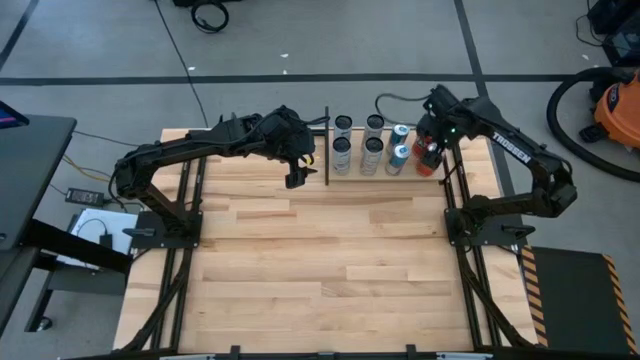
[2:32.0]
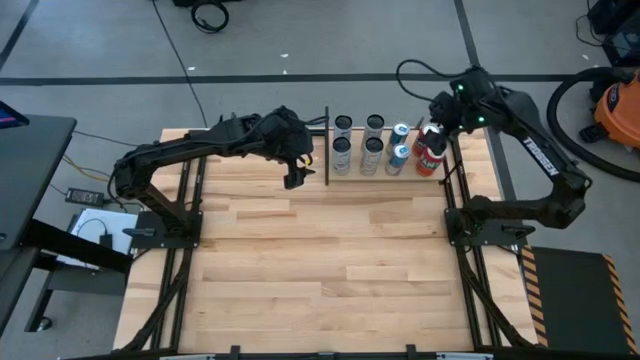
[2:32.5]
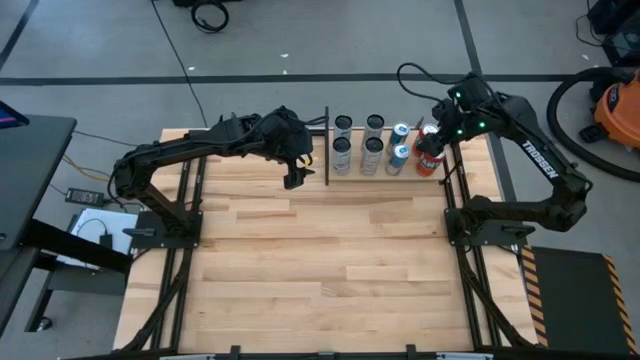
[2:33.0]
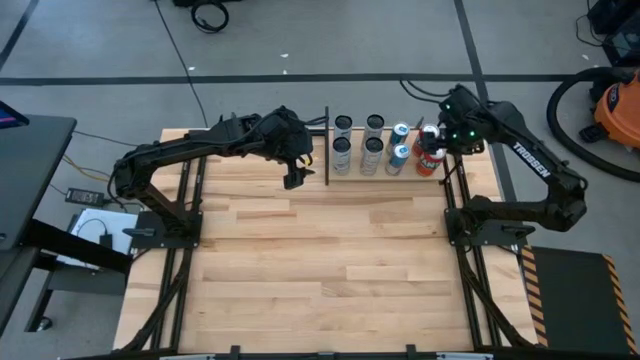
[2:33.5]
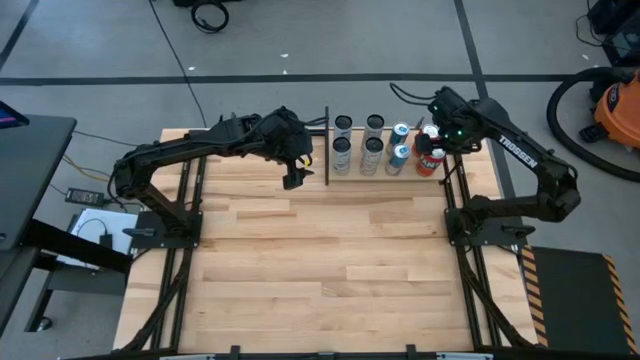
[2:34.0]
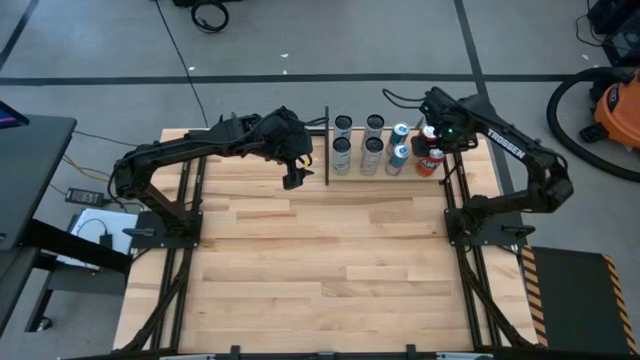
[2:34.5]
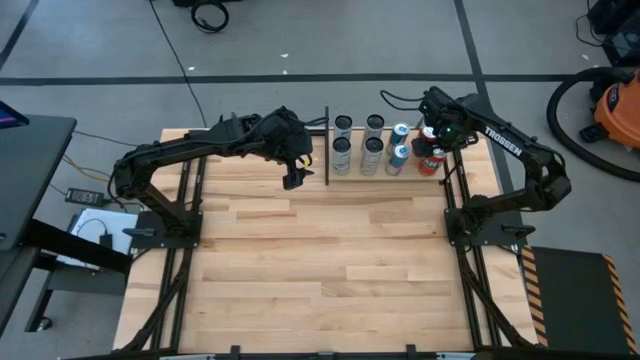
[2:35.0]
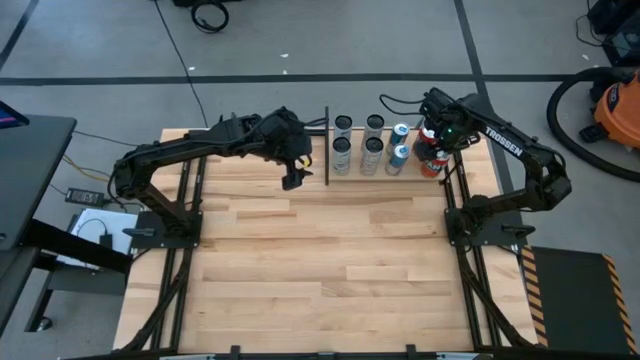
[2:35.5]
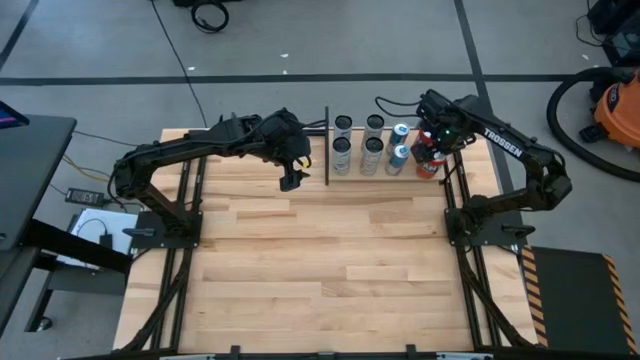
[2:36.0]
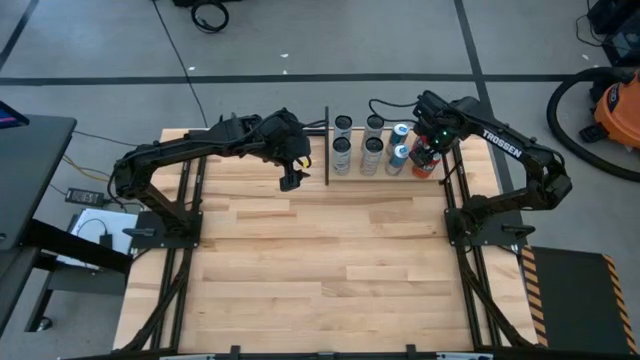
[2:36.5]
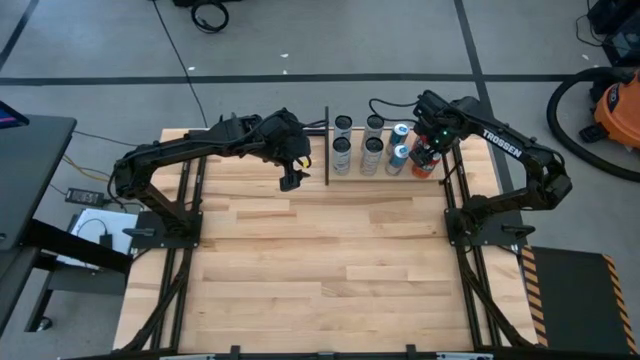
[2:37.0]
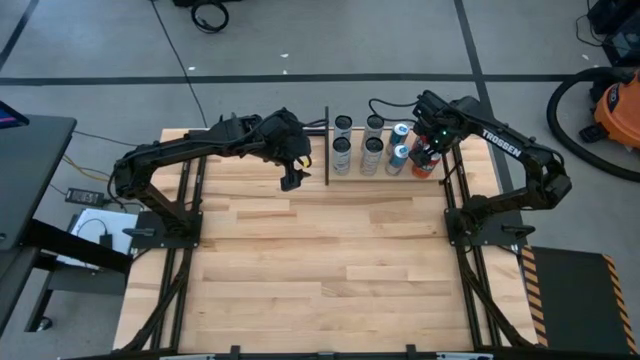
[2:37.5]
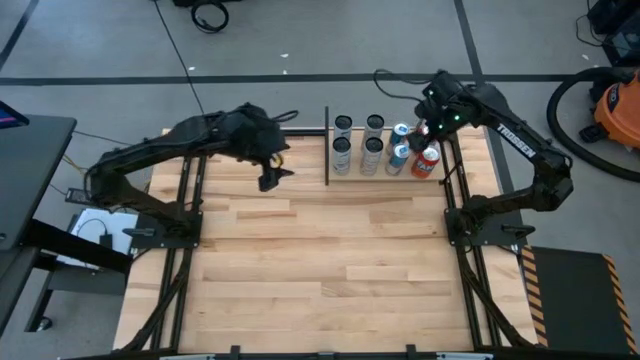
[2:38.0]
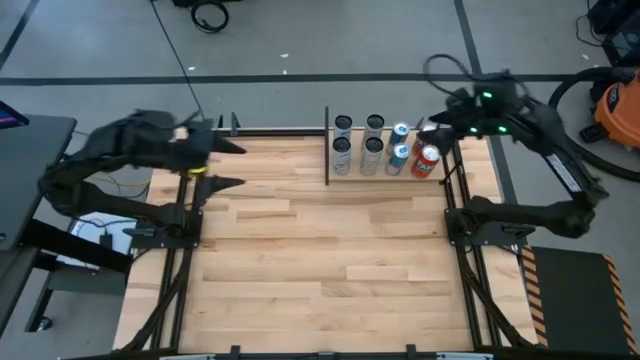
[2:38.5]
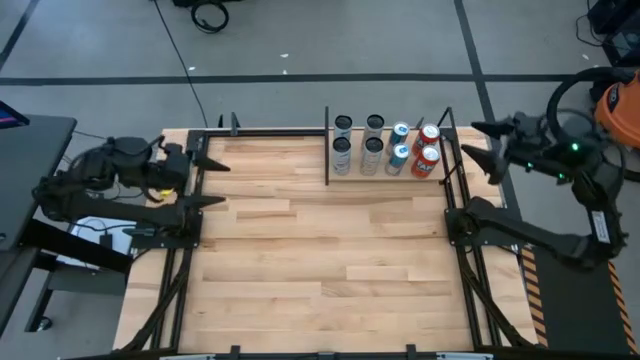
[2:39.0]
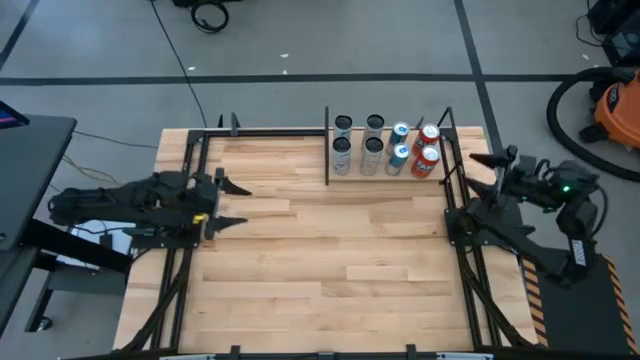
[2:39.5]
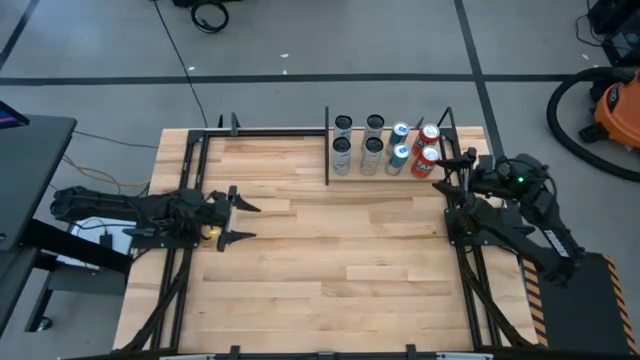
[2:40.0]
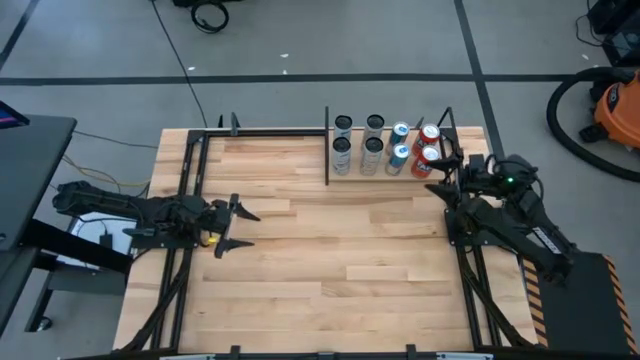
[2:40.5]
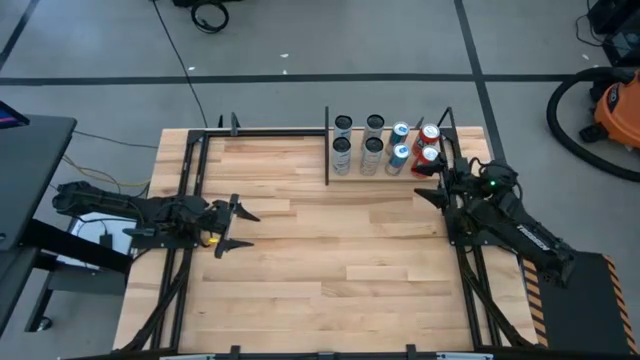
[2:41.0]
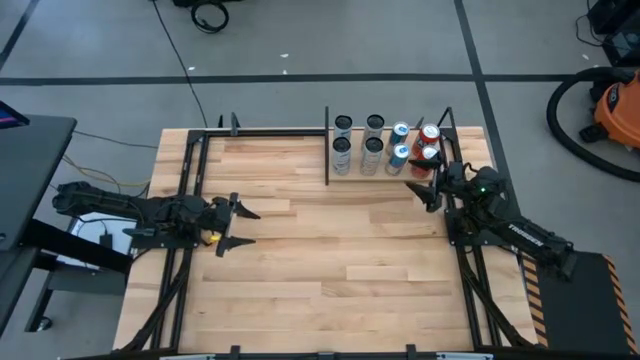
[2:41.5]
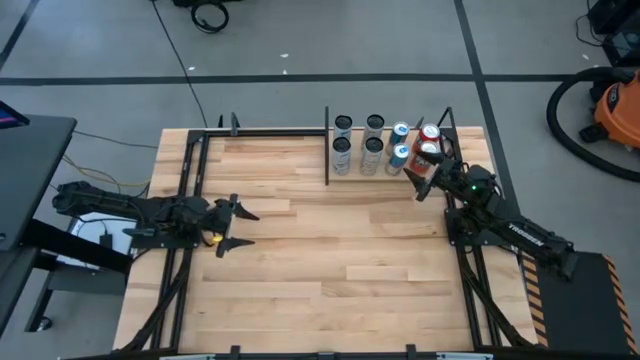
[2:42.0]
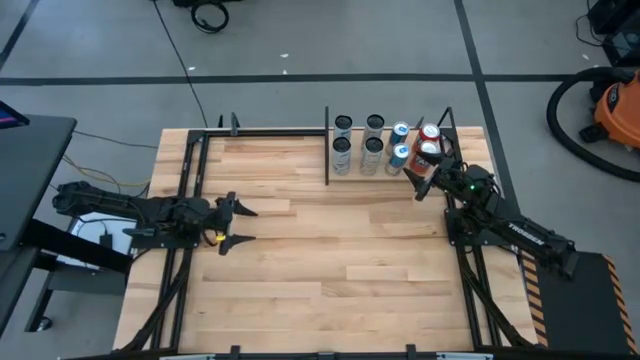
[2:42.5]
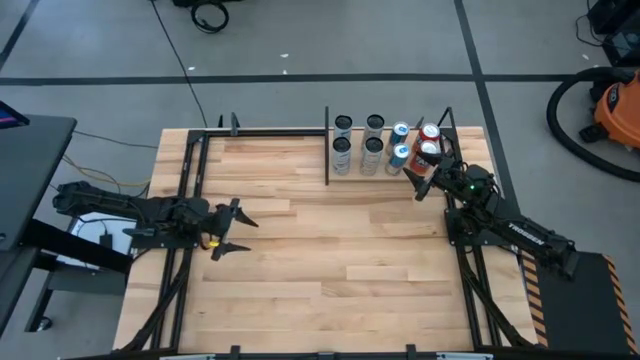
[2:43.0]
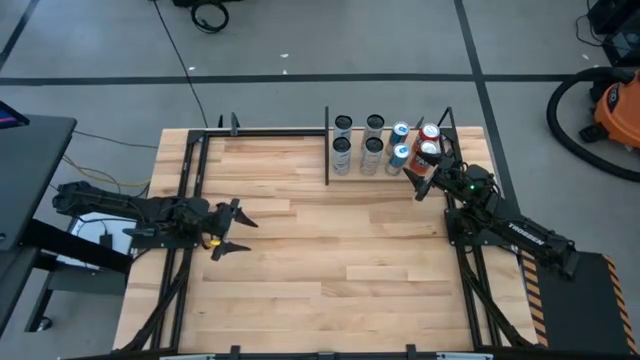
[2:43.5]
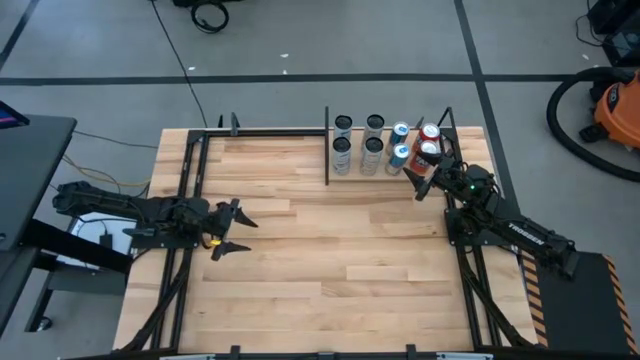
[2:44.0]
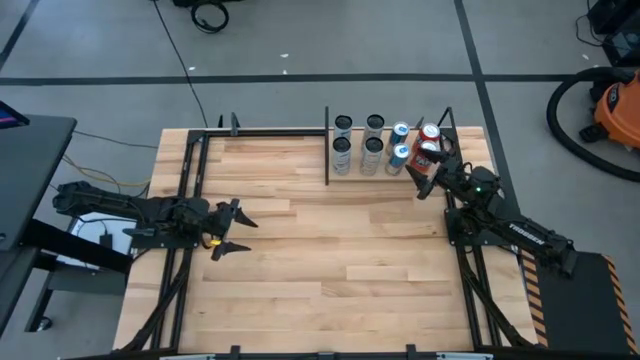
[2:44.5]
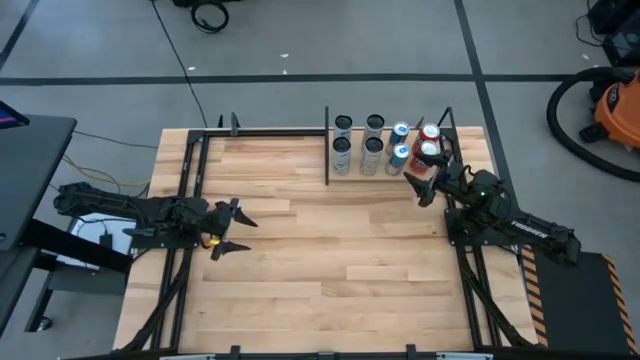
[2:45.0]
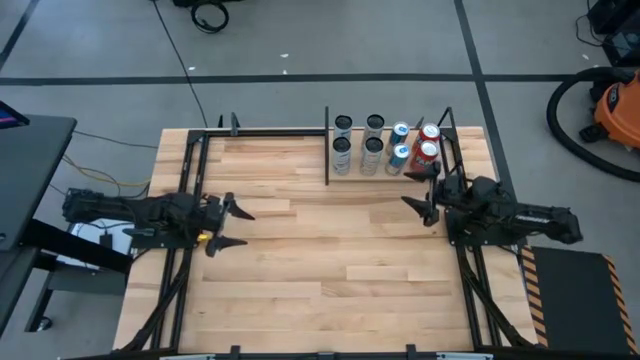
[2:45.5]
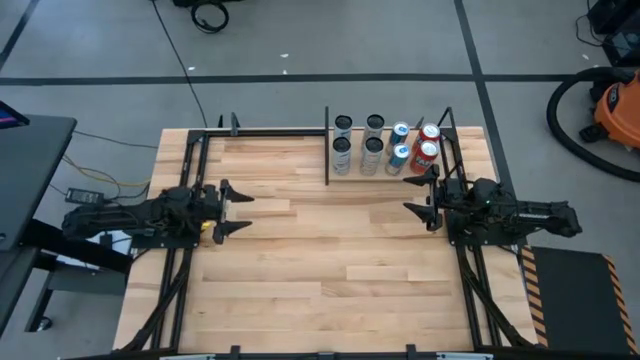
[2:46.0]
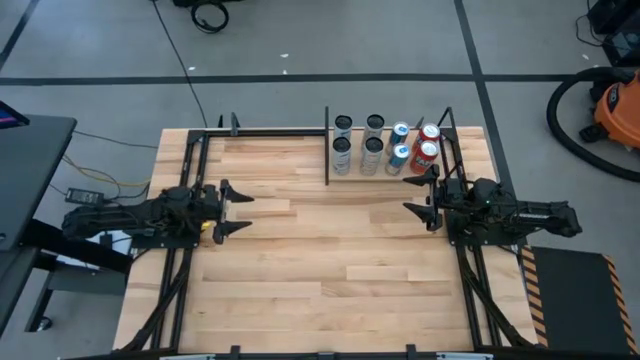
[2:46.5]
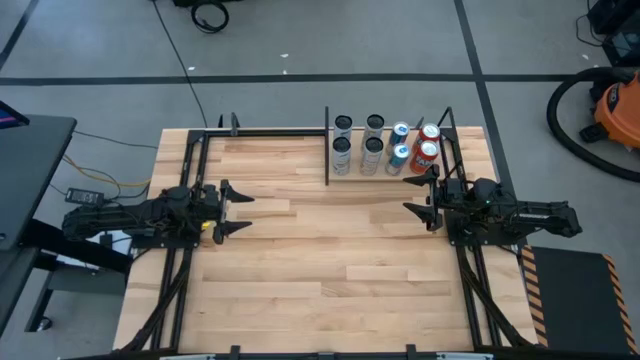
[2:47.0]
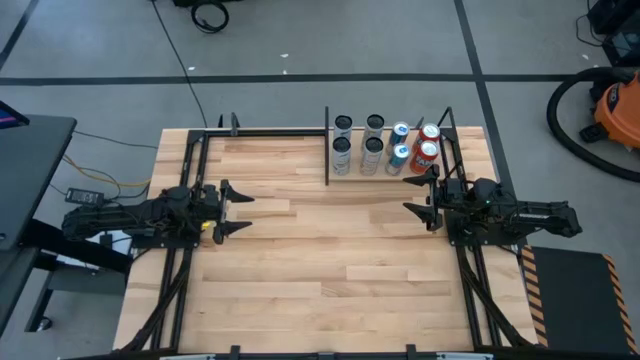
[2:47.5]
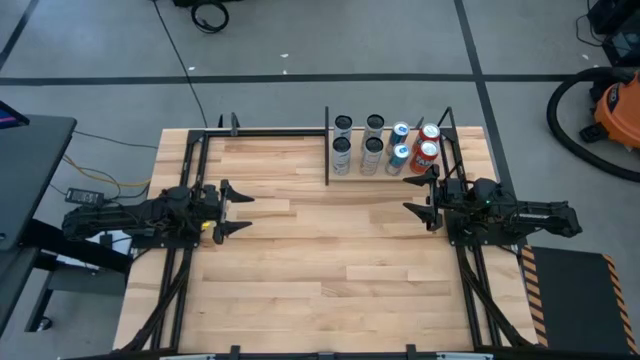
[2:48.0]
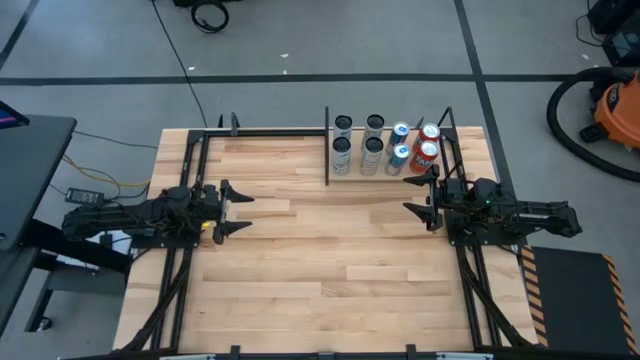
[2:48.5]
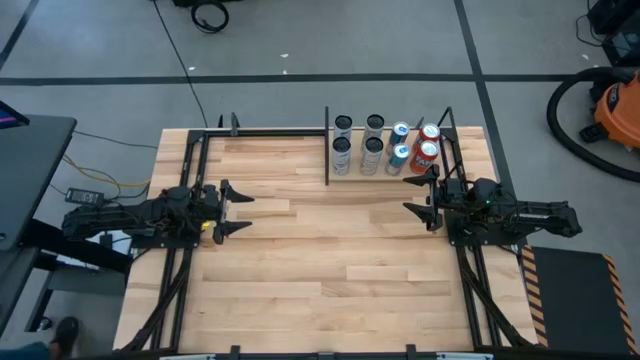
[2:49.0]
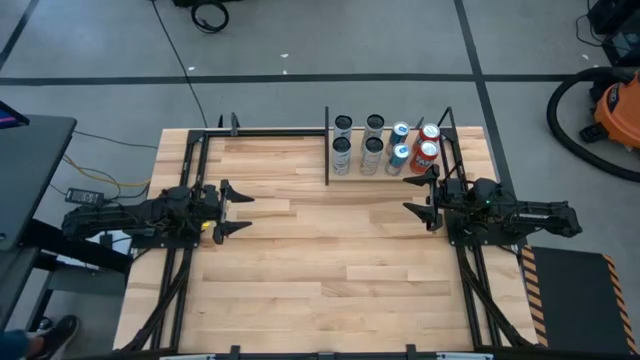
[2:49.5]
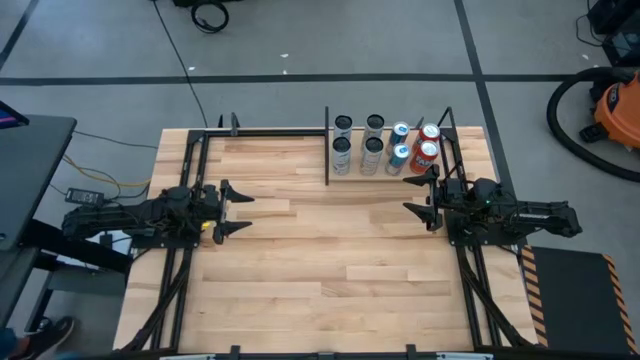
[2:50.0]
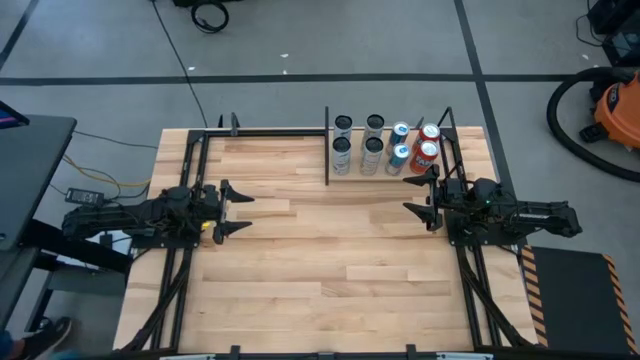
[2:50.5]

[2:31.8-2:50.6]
Task: Place canned beverage on shelf
Return to Home Position

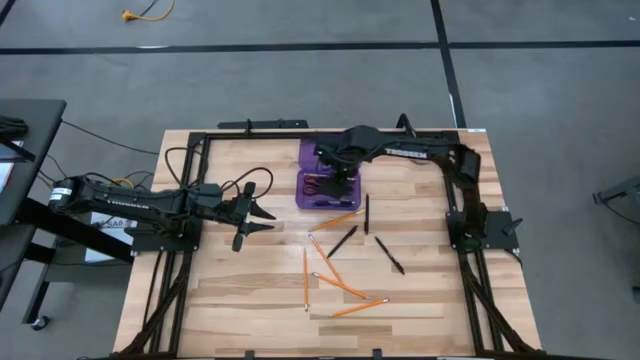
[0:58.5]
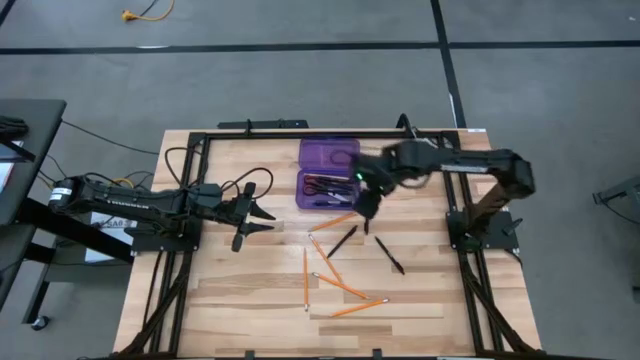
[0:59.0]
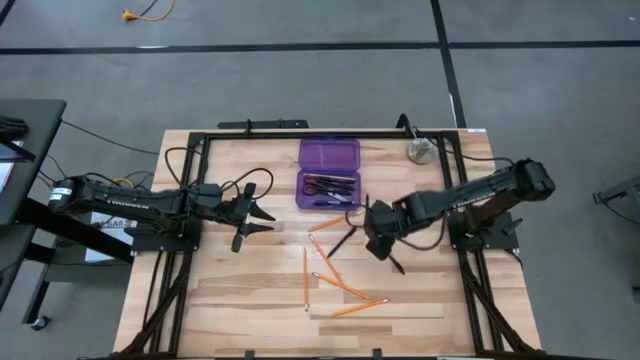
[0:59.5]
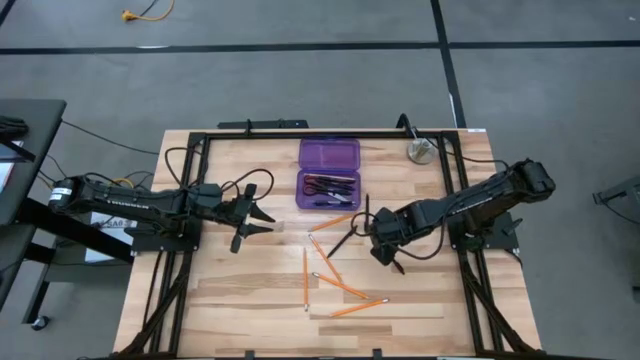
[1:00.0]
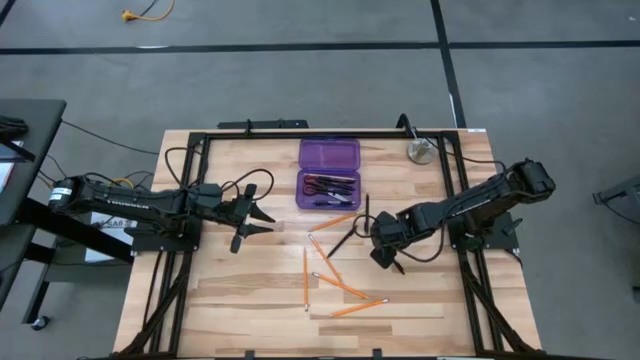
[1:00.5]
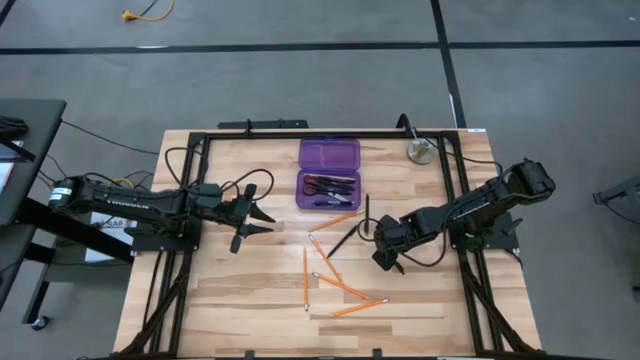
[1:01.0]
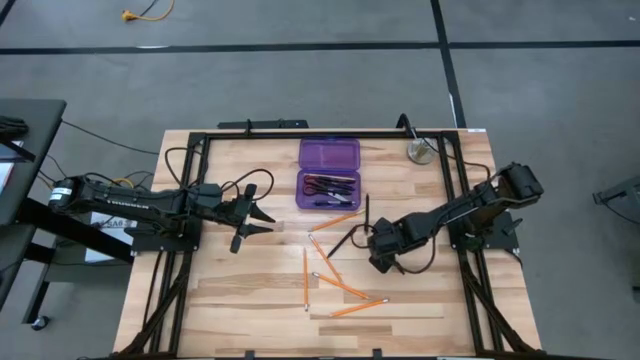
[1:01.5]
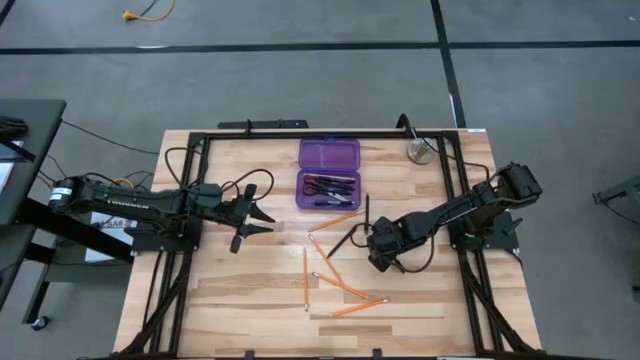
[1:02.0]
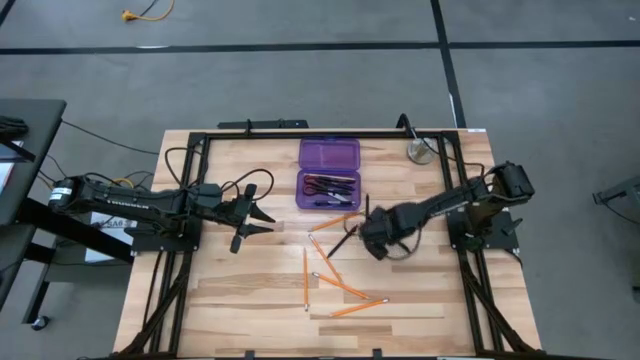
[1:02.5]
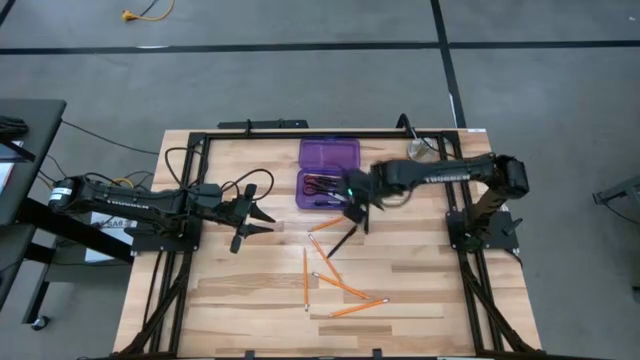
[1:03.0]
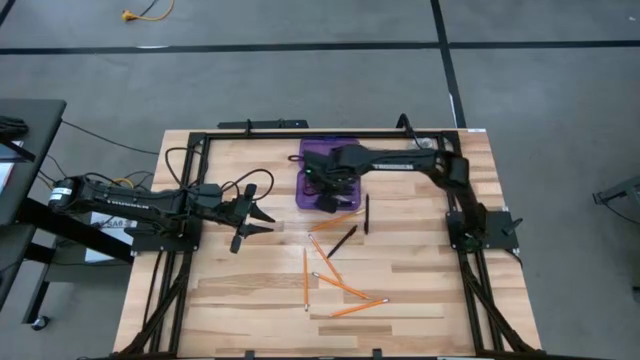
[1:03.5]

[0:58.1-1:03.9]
Task: Pick & place school supplies into a supply box
Put the black pen into the violet supply box
